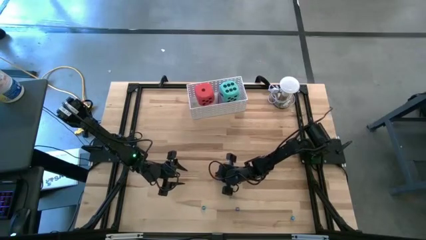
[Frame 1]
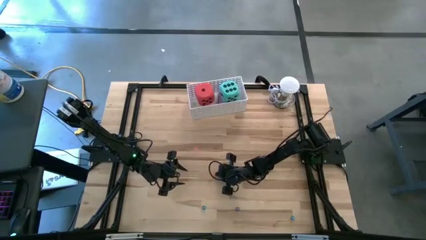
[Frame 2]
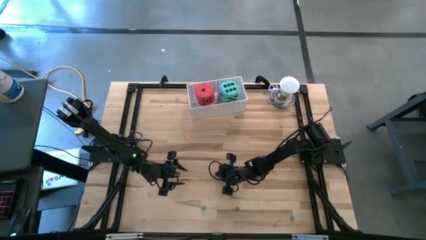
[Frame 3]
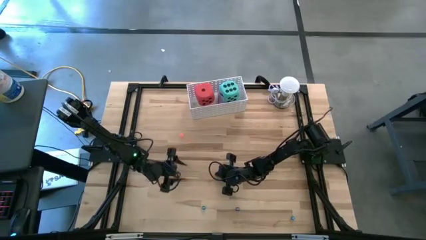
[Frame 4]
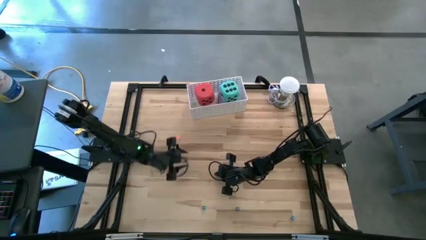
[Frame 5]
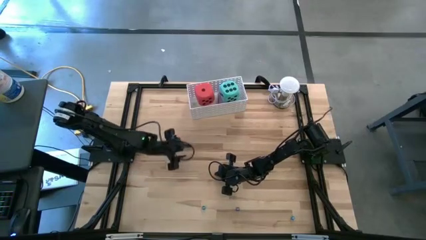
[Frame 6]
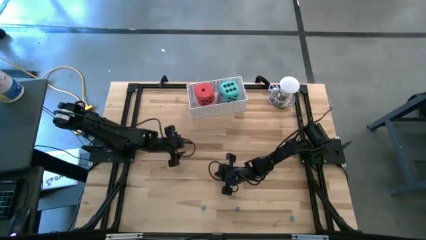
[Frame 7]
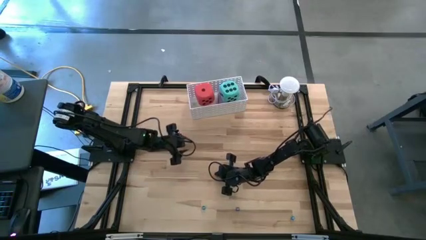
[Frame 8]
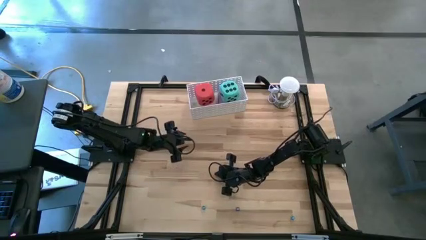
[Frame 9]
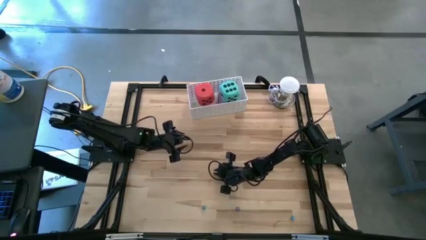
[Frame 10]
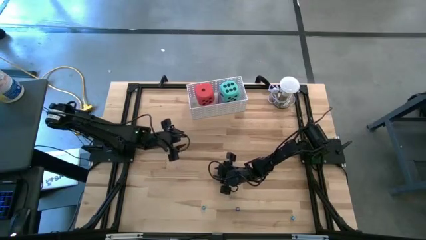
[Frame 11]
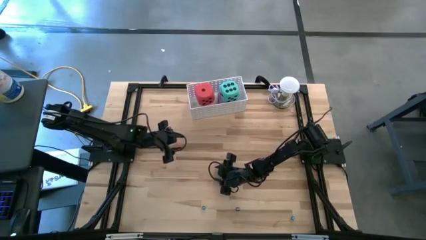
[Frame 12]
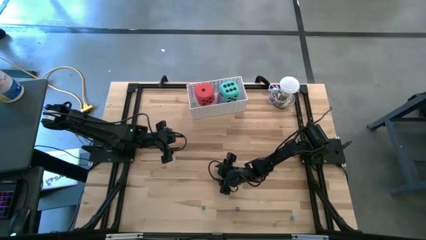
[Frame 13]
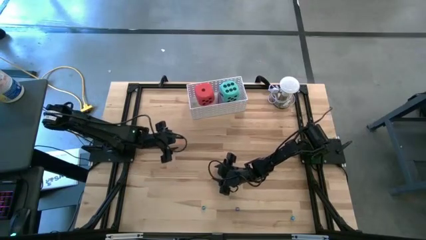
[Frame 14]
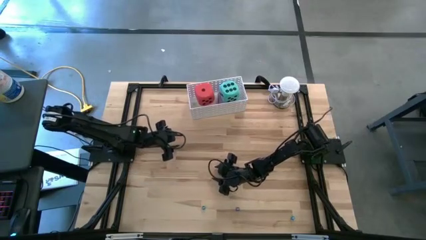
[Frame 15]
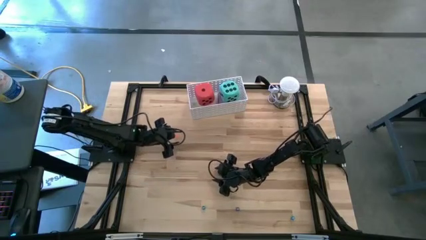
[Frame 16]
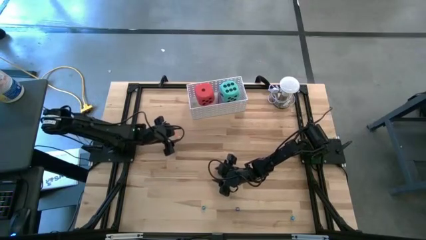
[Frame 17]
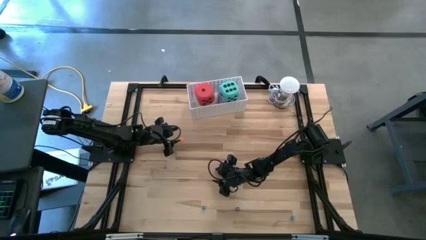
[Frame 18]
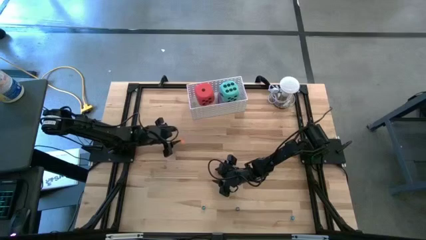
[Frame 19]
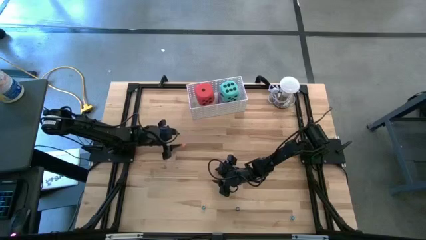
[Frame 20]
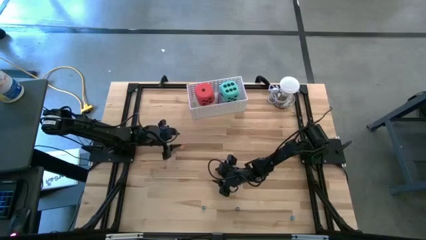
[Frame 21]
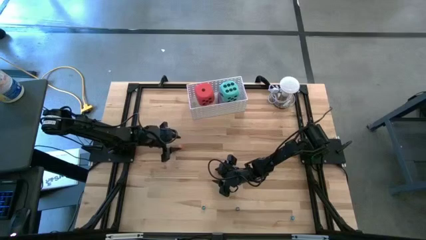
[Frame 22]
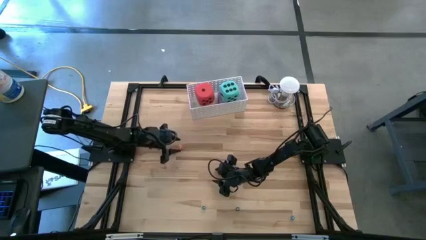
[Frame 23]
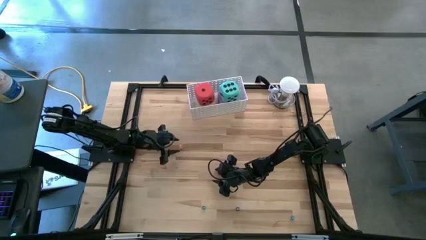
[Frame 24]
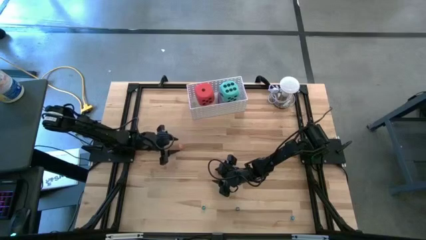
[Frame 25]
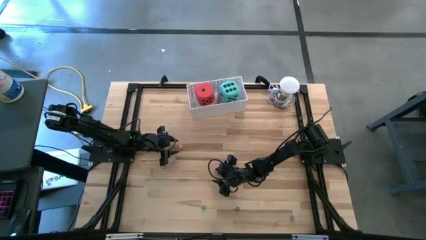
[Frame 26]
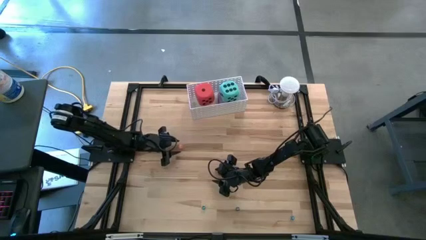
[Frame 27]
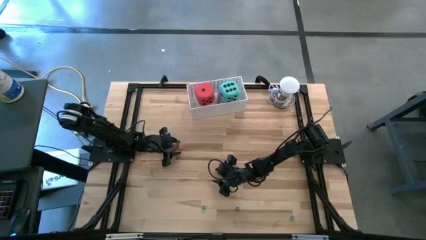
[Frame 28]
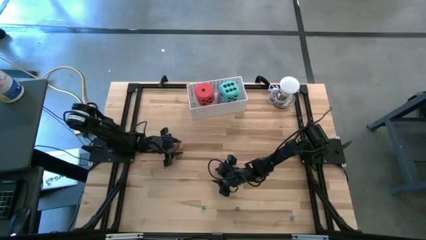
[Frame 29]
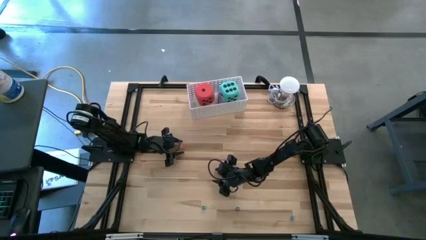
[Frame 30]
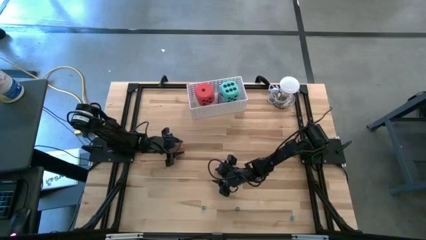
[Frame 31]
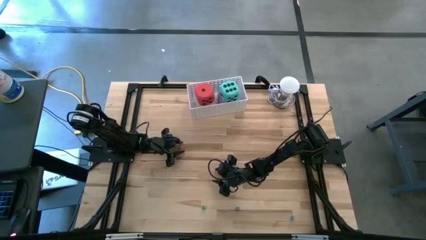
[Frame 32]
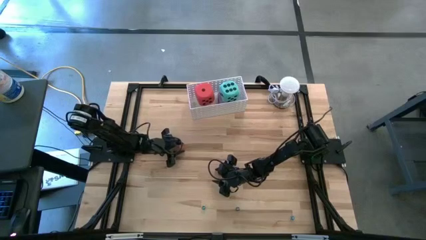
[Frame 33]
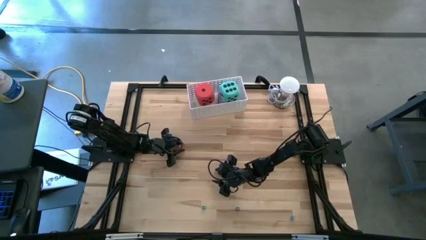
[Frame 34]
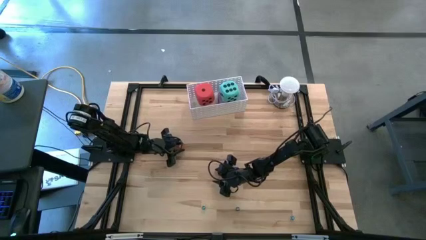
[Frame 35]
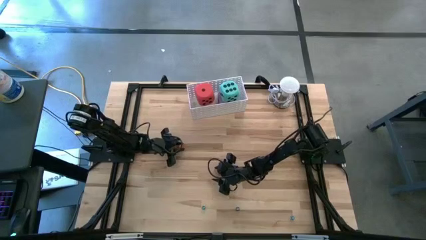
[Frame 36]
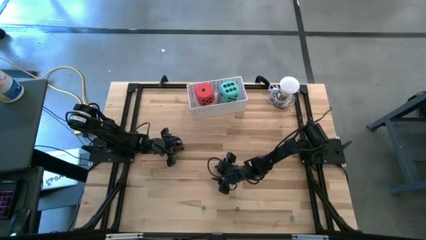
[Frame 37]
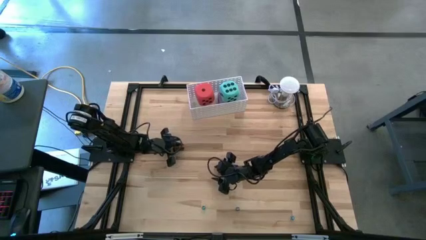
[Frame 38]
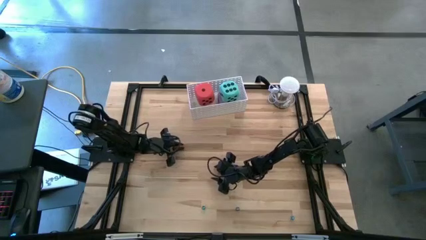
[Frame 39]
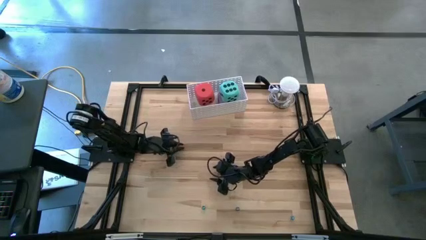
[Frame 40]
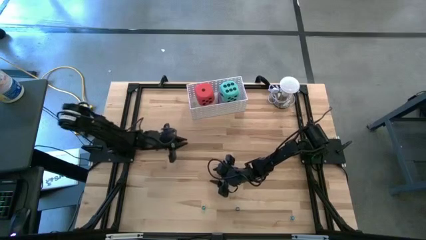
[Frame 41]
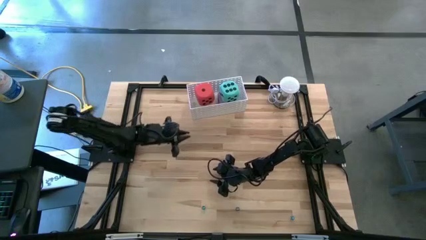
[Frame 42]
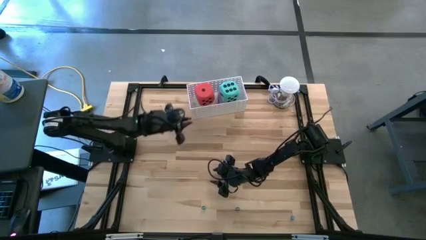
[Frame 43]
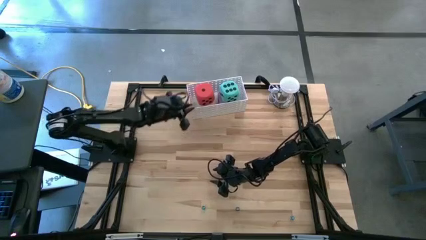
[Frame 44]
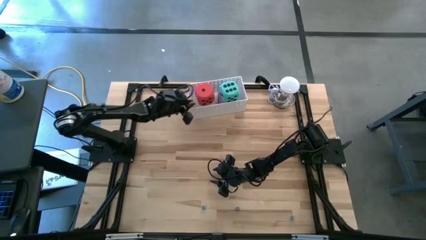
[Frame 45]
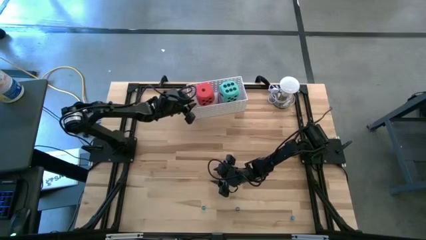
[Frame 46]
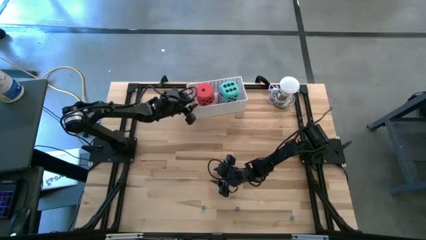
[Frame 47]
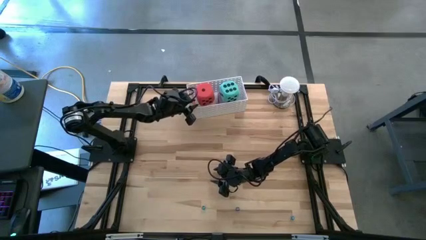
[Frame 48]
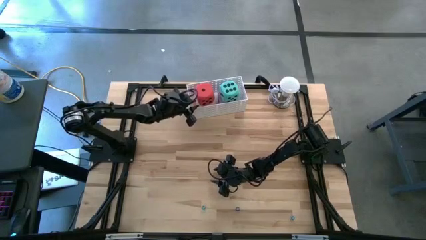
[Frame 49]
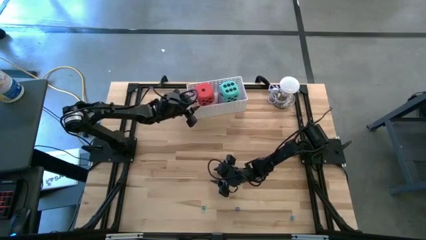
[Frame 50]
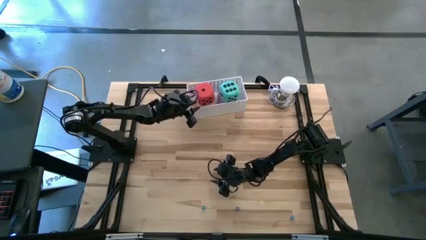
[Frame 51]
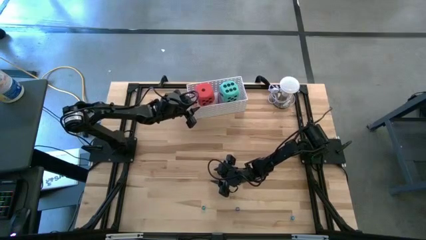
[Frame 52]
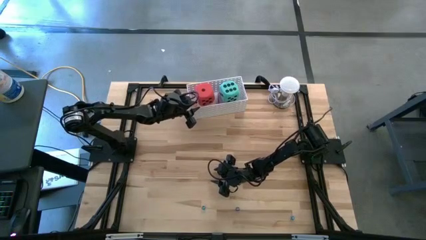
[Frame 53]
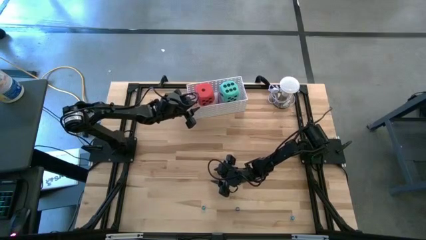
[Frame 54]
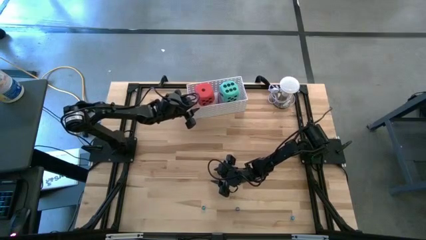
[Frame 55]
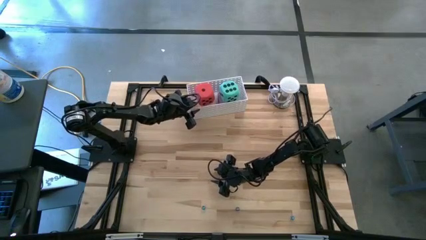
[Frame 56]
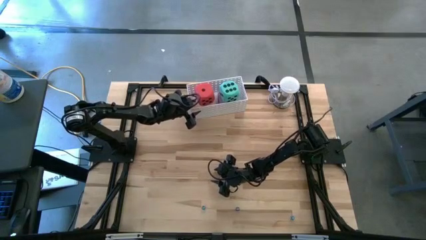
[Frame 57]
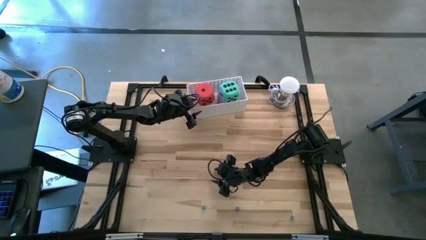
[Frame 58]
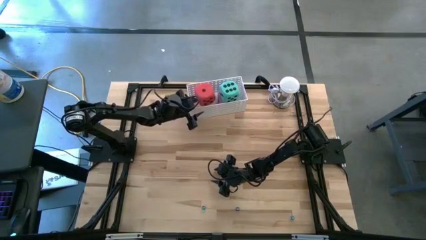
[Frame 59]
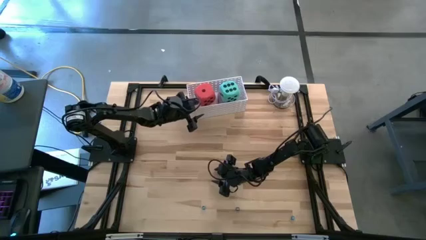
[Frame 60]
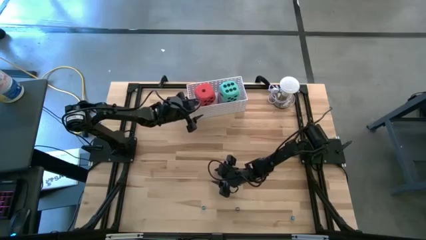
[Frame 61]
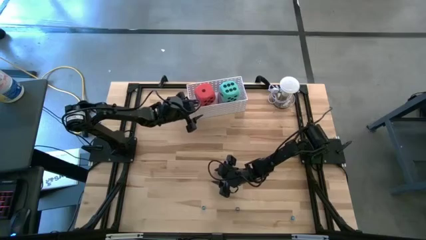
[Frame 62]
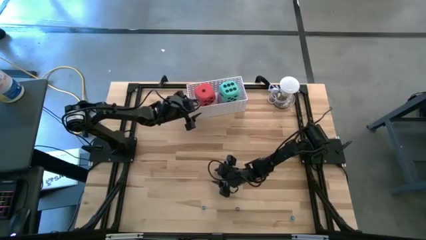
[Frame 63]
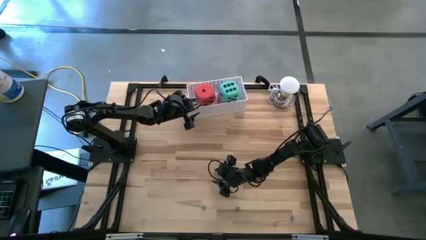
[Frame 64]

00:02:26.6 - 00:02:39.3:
Task: Pick & Place Dice
Put the small orange dice into the white bin

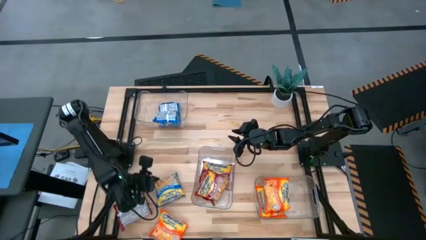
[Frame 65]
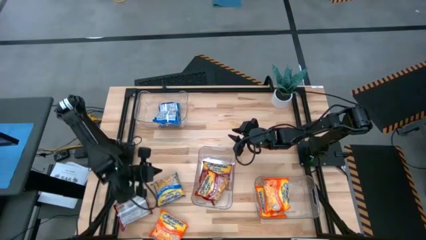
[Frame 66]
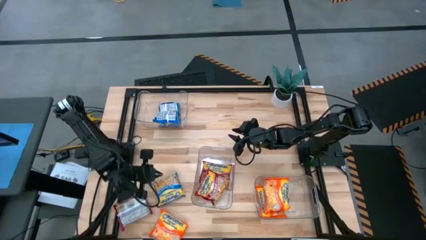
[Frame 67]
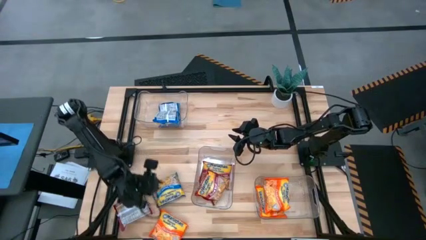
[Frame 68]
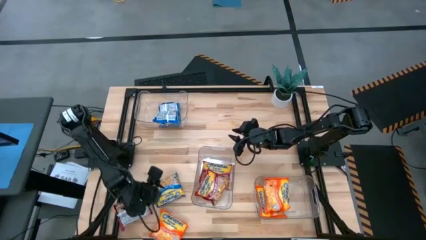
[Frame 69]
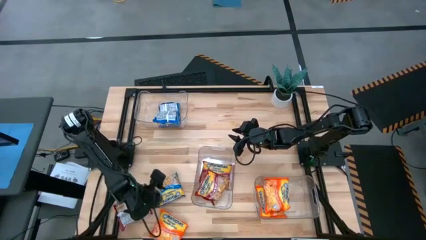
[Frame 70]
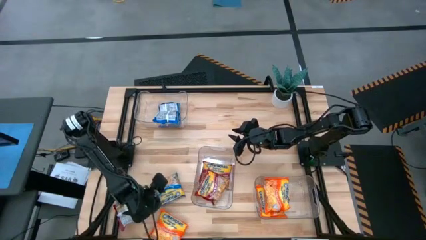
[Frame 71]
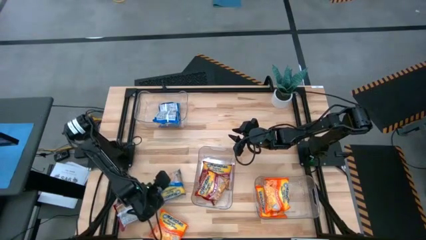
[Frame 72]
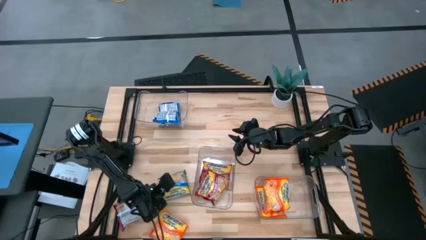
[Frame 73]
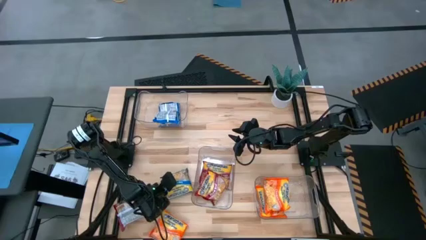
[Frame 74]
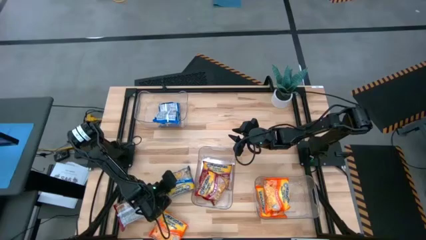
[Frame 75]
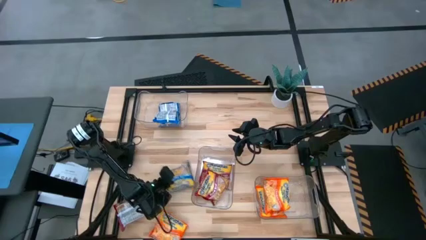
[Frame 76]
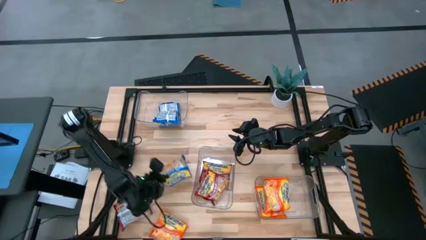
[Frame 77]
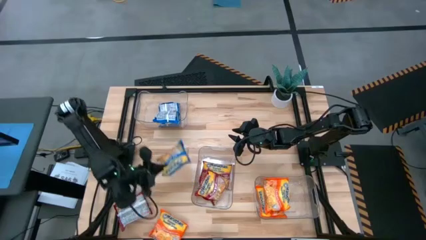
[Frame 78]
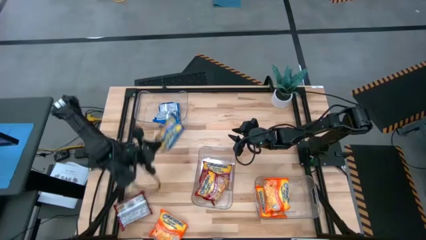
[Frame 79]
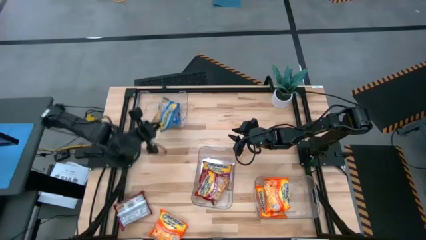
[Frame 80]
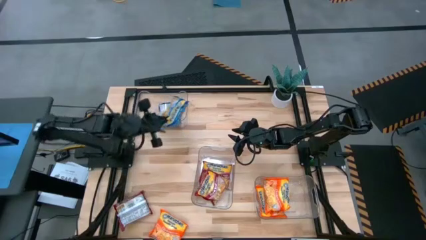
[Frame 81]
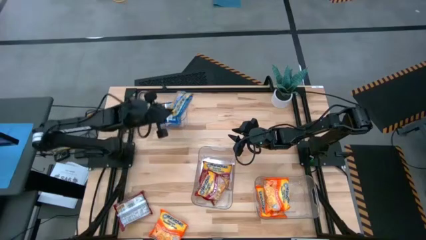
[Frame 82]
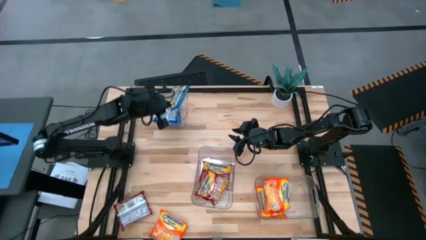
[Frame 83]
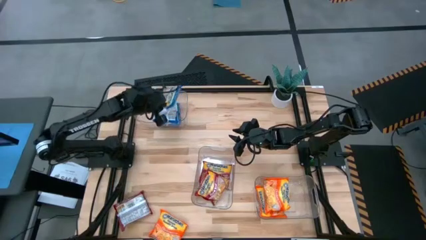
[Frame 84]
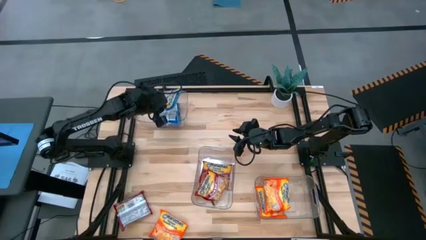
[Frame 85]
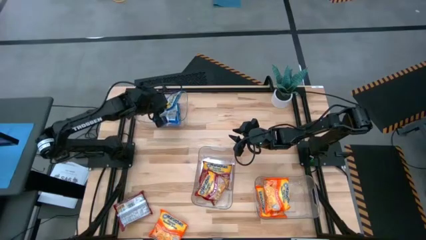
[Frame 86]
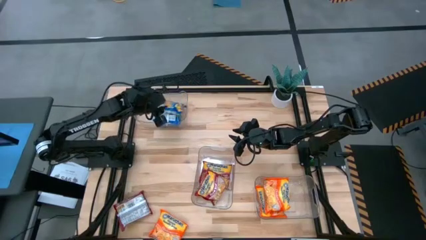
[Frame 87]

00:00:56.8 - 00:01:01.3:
Task: Sort Maruchan noodles
Put the blue noodle pack into the top transparent bin
